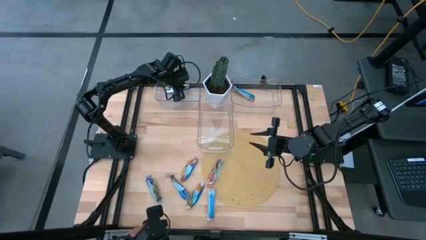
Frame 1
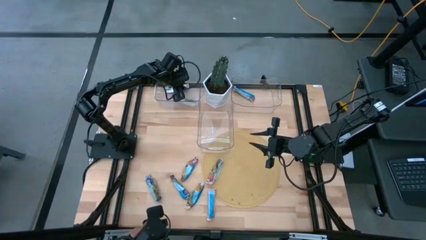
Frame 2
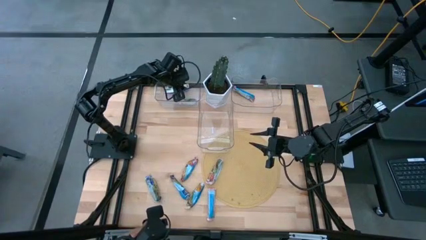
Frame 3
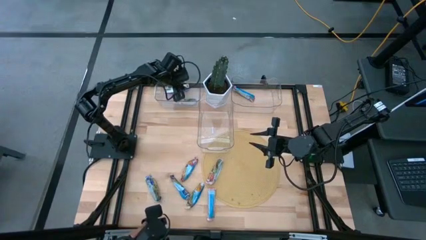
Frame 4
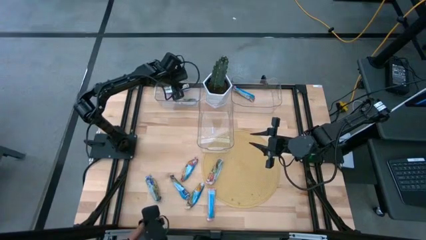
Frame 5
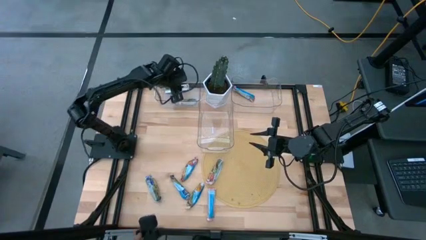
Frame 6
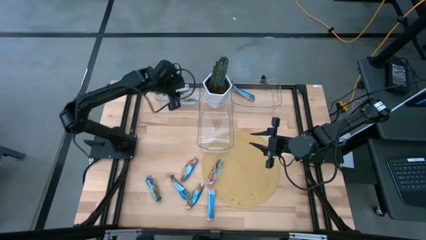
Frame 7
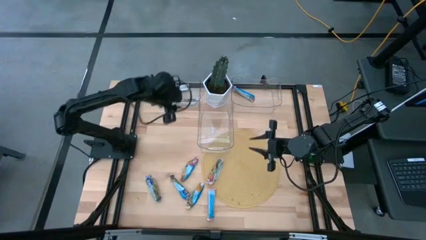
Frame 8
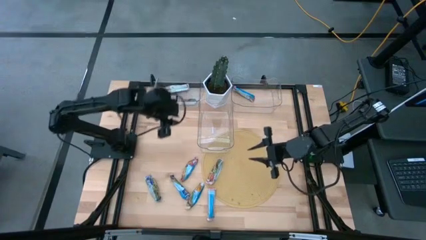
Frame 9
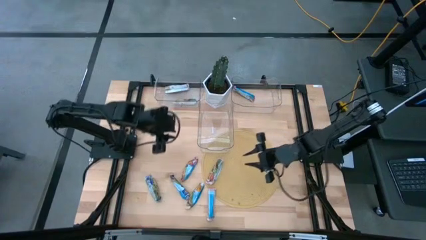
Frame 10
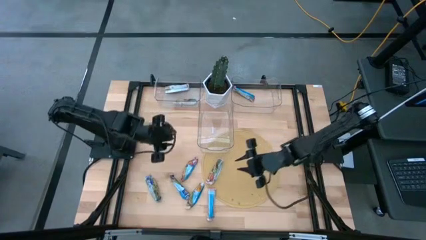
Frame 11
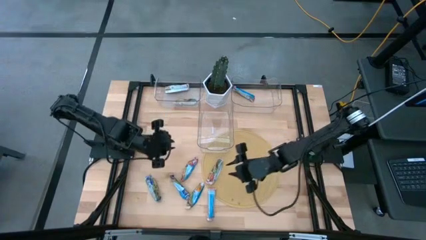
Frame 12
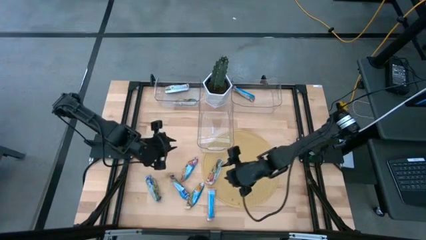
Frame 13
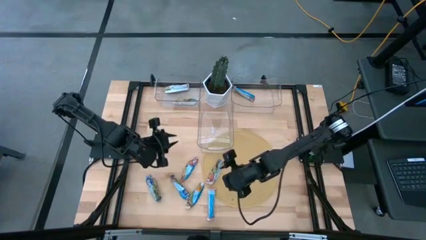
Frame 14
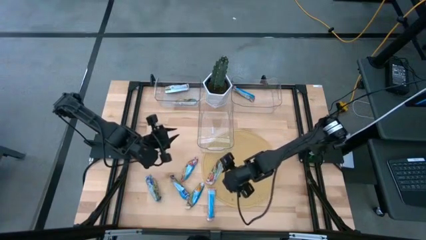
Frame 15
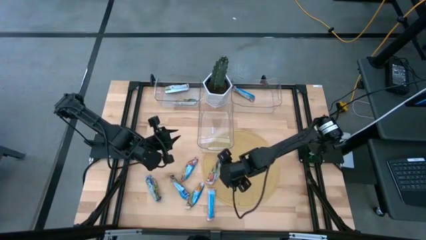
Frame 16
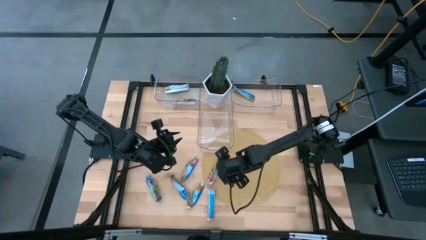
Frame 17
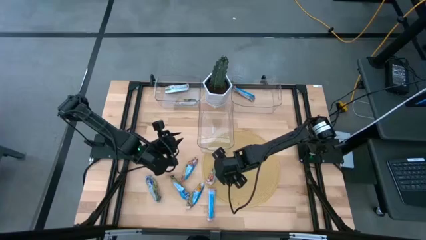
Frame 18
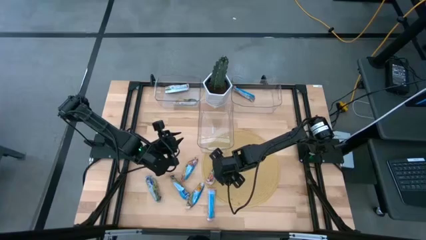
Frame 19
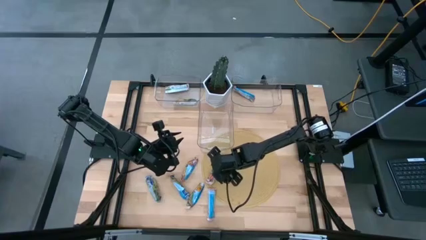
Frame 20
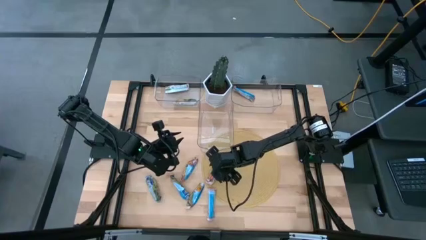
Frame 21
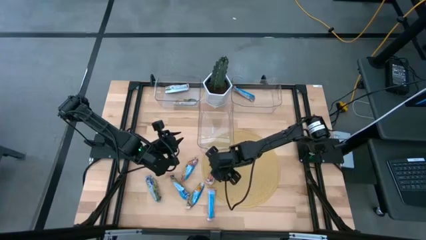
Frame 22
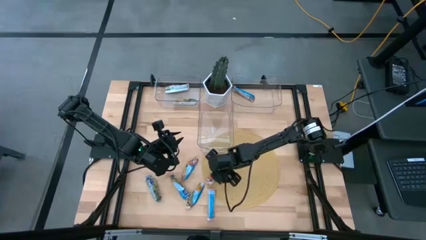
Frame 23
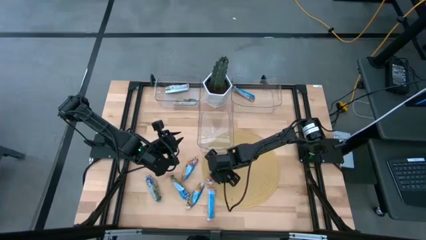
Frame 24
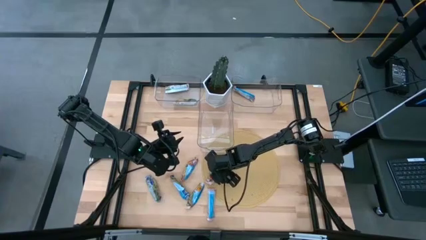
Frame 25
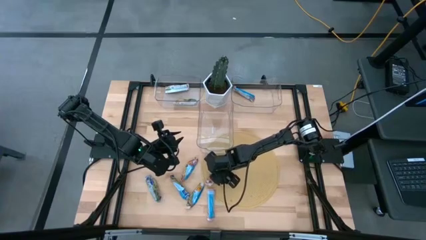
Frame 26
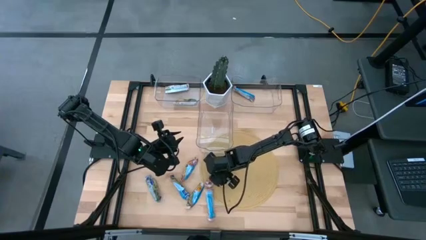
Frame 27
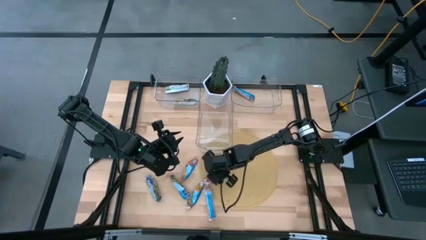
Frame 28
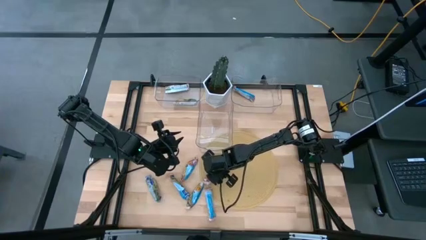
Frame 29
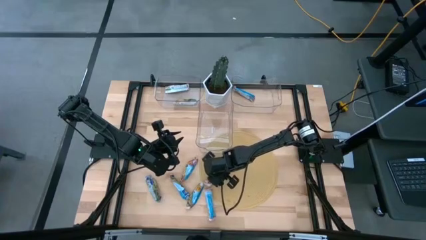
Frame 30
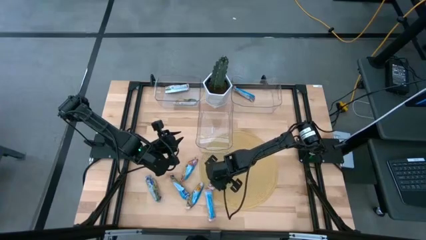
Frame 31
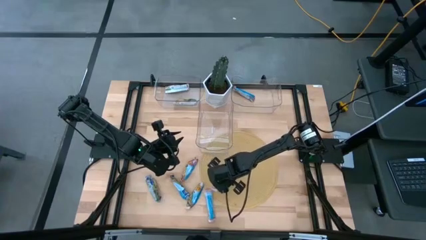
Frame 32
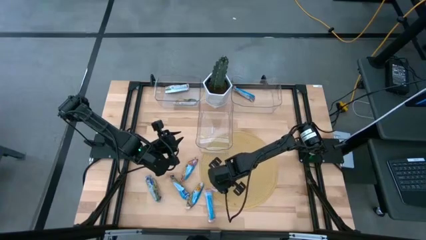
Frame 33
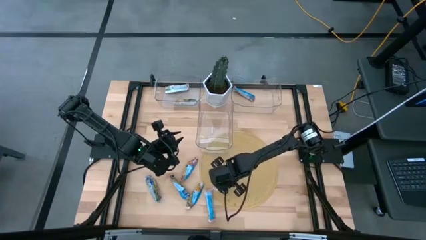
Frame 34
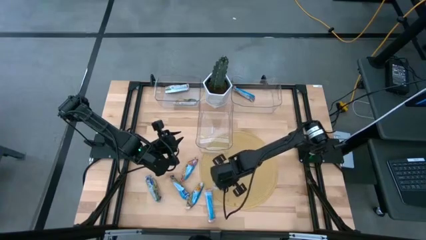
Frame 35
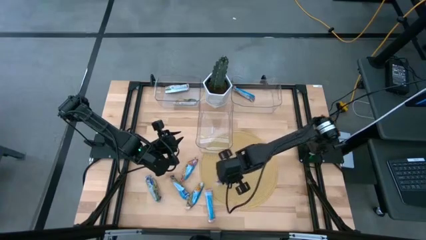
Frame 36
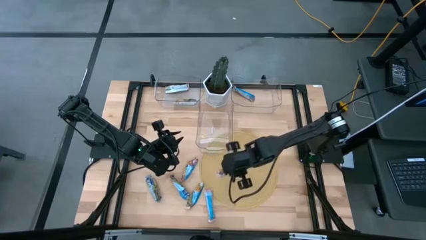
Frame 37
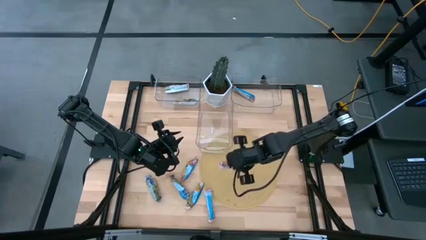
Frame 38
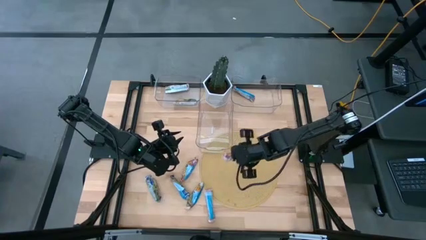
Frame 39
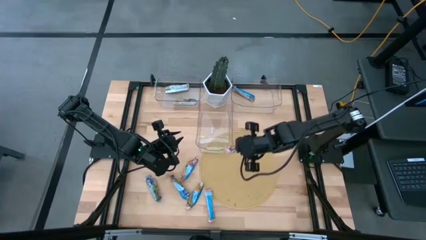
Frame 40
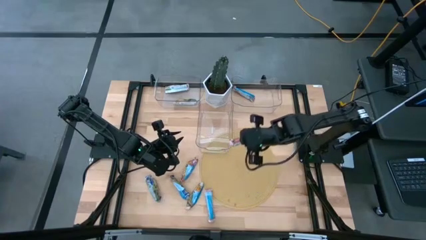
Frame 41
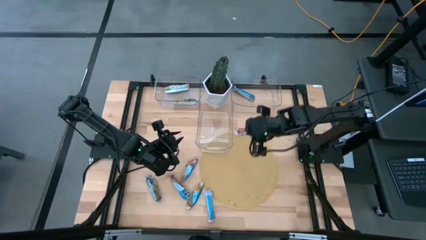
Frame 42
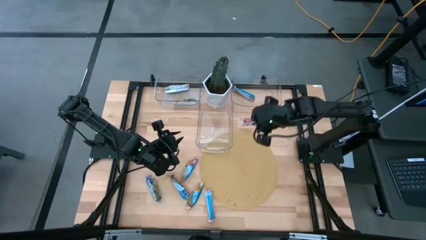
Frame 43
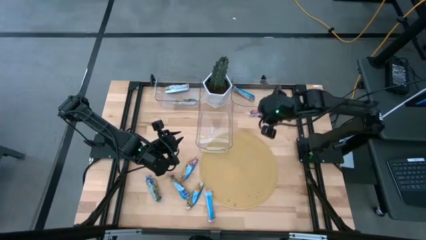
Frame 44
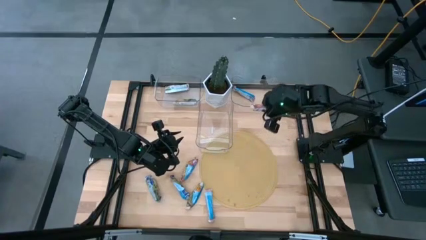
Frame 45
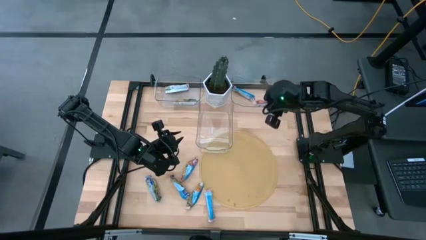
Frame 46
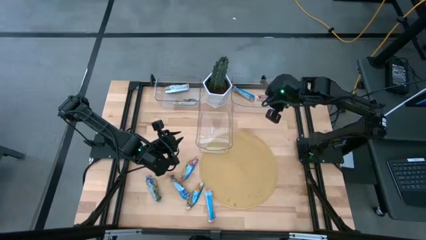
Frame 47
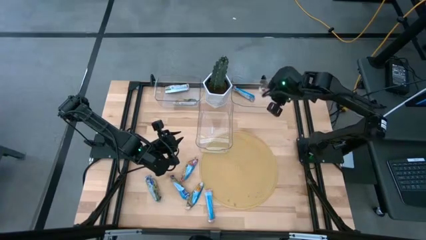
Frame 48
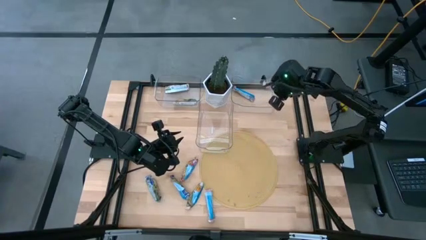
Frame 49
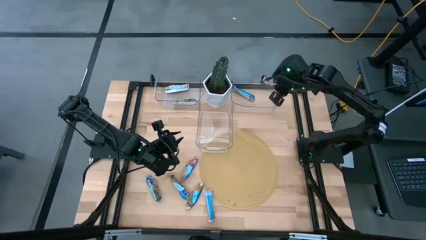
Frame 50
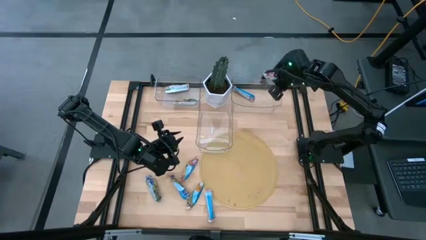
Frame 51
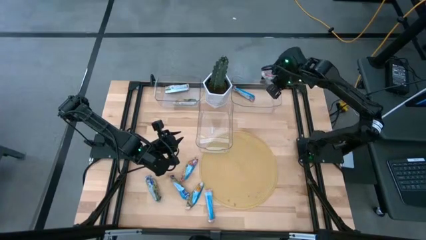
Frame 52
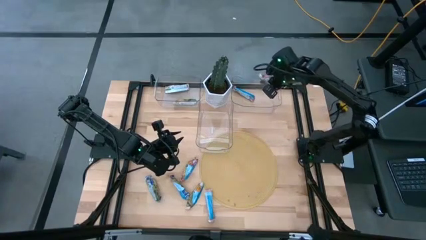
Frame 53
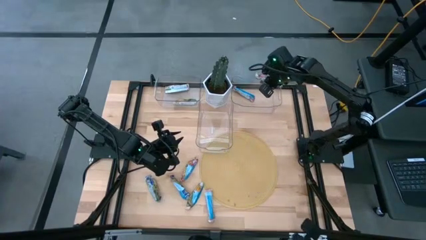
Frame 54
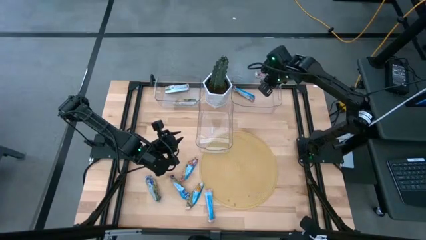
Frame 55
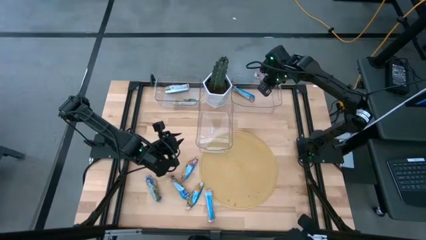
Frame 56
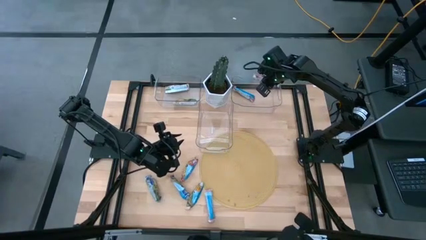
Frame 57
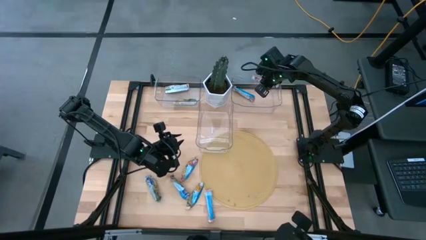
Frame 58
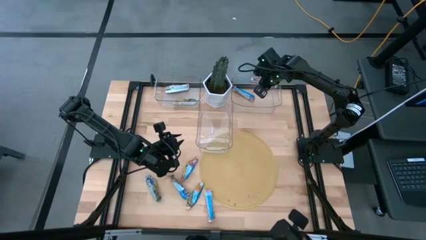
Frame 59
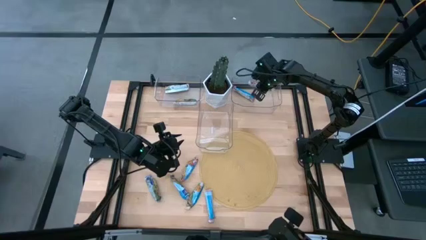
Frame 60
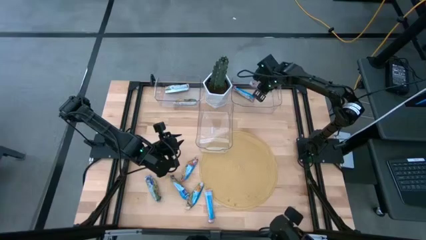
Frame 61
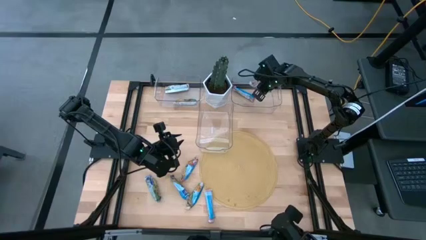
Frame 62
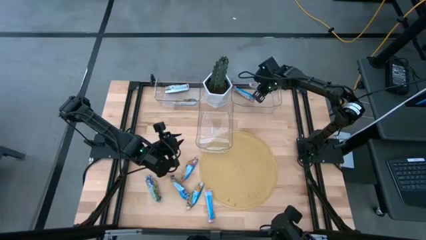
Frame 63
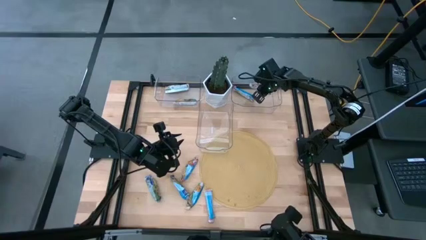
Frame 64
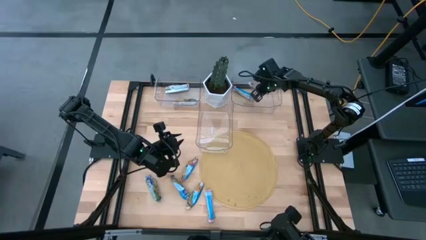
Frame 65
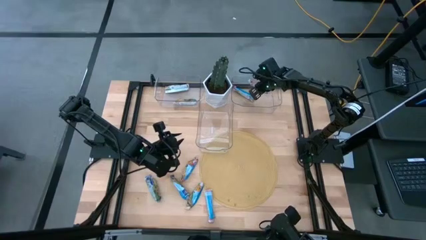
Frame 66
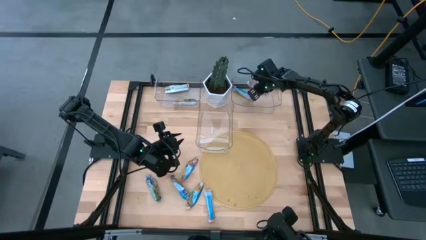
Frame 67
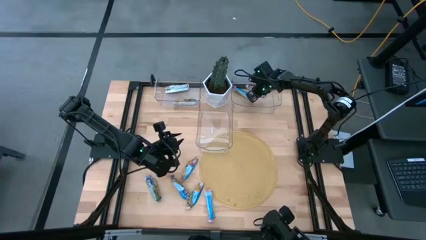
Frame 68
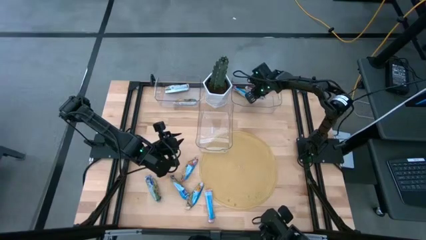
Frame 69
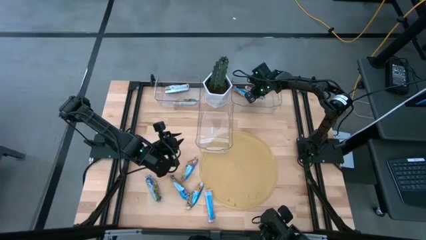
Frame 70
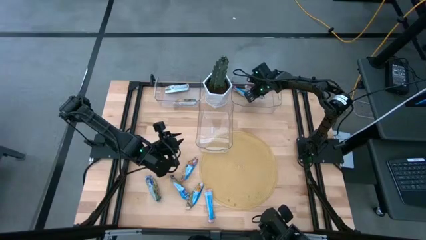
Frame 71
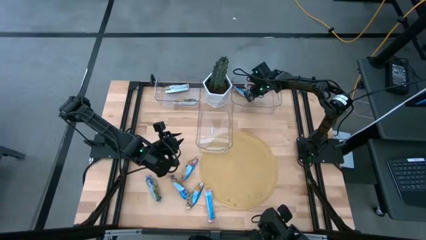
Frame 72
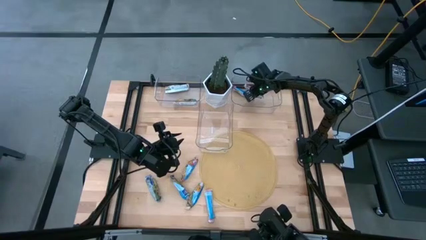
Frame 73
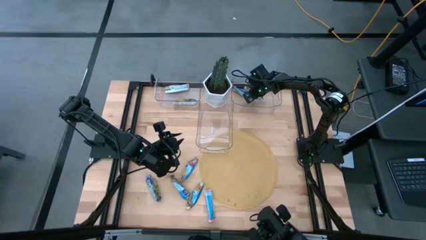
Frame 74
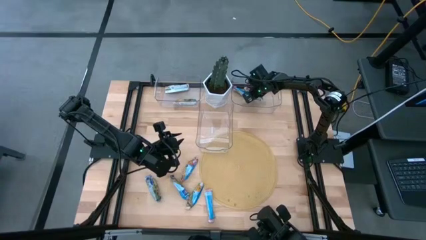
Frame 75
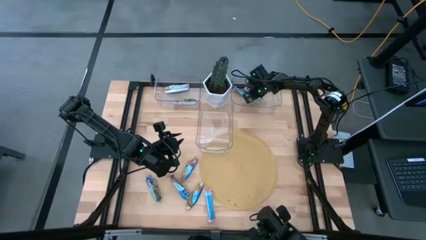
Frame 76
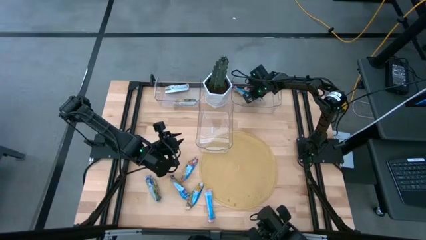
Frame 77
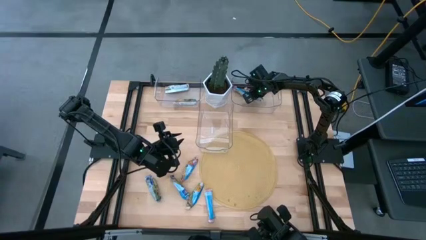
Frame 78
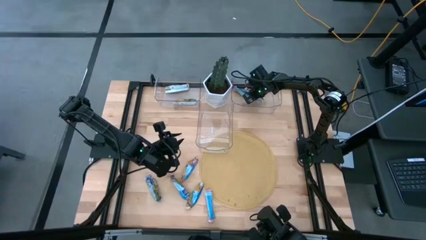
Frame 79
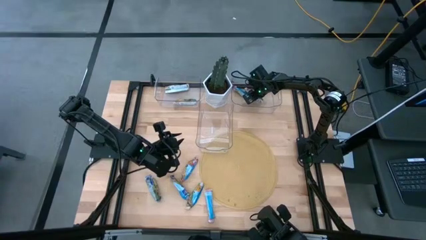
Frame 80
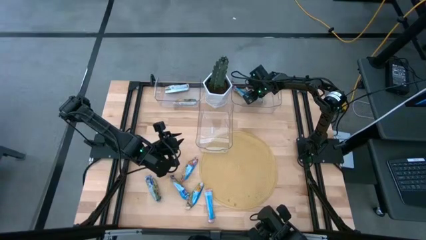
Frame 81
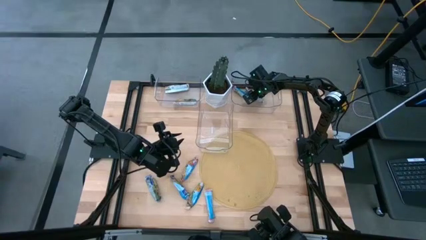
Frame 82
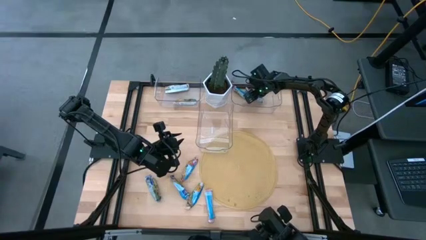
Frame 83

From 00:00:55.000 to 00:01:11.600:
Task: Pick and place Granola Bars by type
Put the red green granola bar into the right transparent bin
